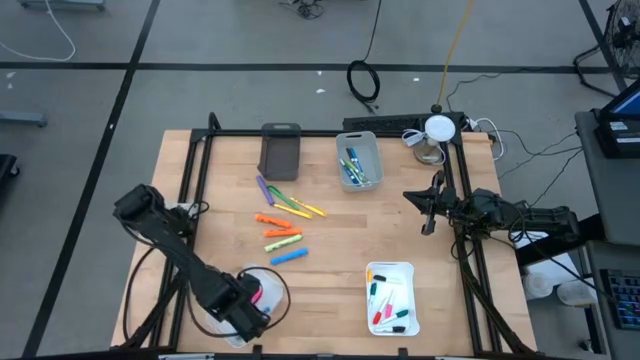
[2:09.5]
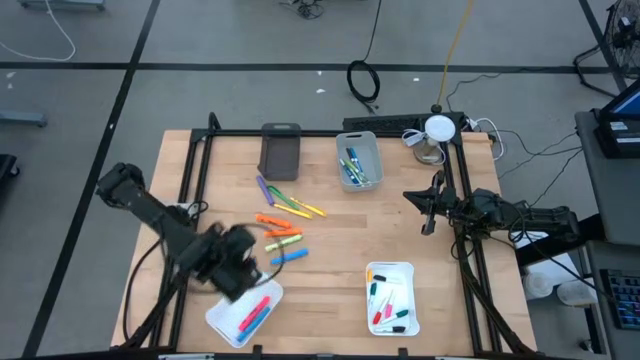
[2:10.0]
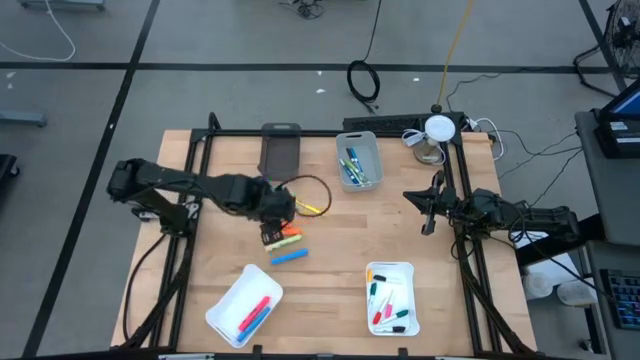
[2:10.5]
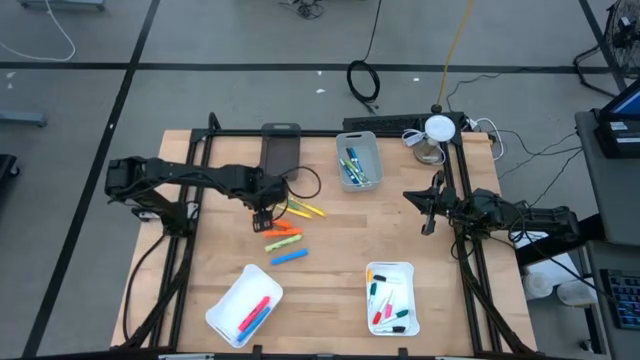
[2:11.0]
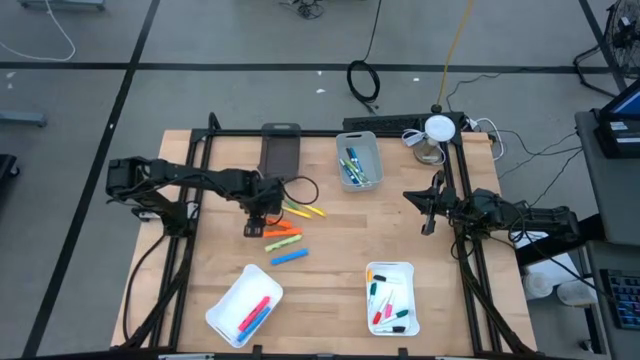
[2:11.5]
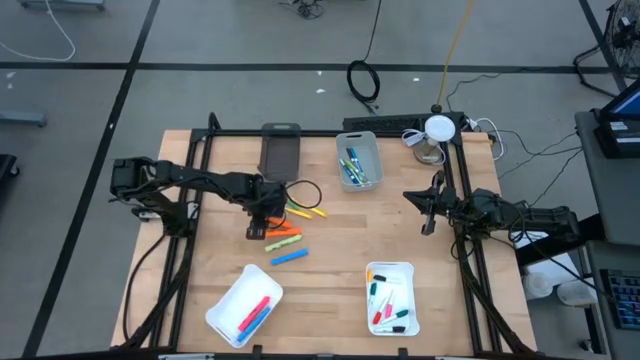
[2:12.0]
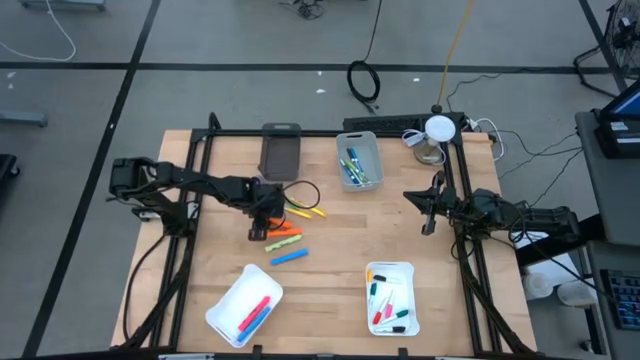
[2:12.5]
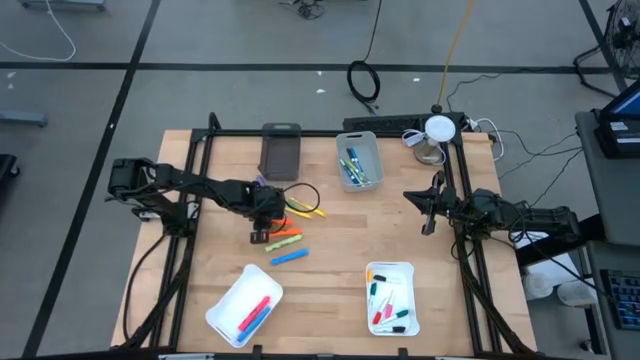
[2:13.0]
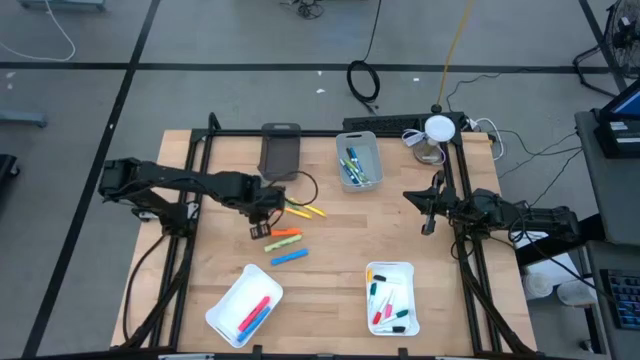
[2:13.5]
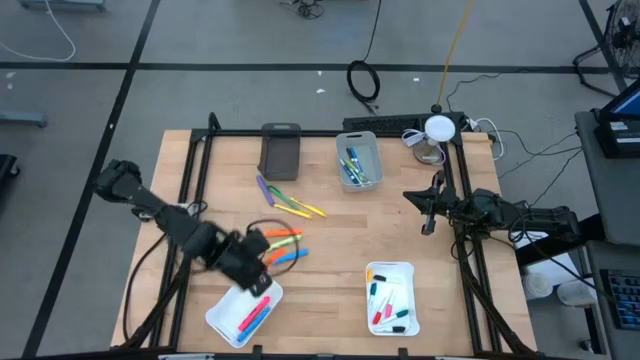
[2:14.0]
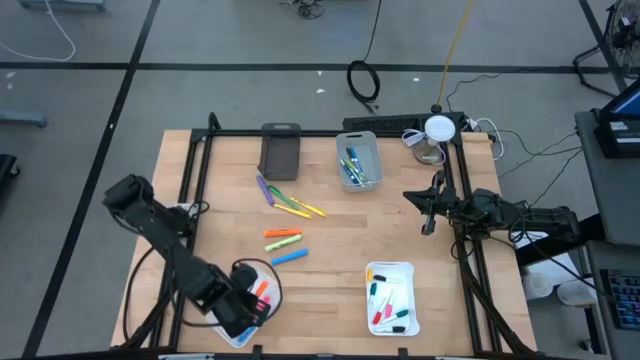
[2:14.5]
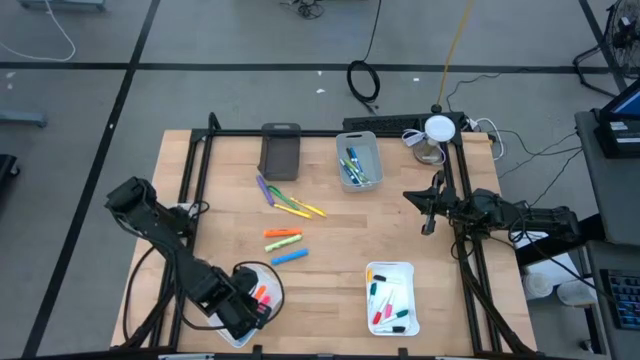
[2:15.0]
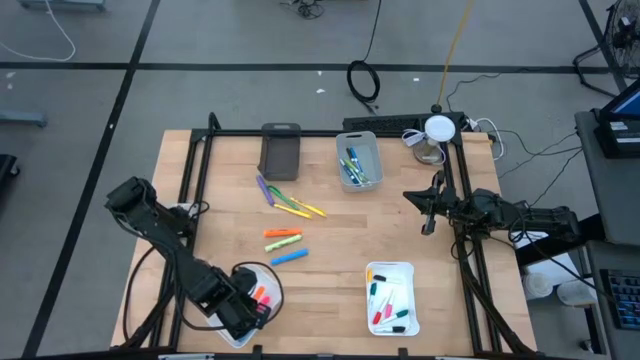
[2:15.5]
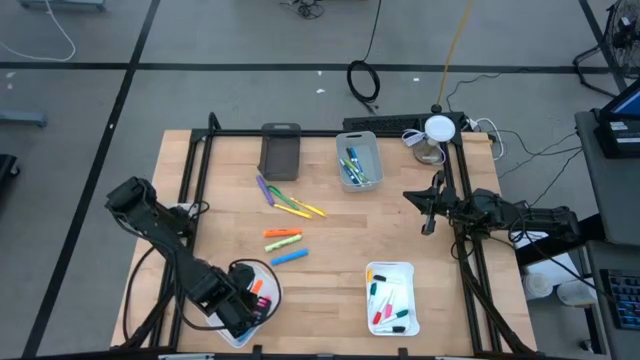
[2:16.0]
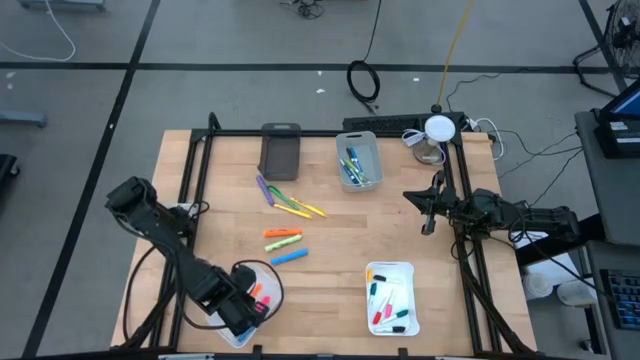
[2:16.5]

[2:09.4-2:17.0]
Task: Pick & Place Markers
Put the top orange marker pen into the left white bin

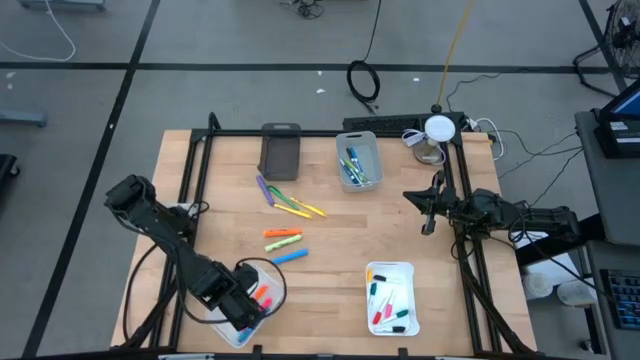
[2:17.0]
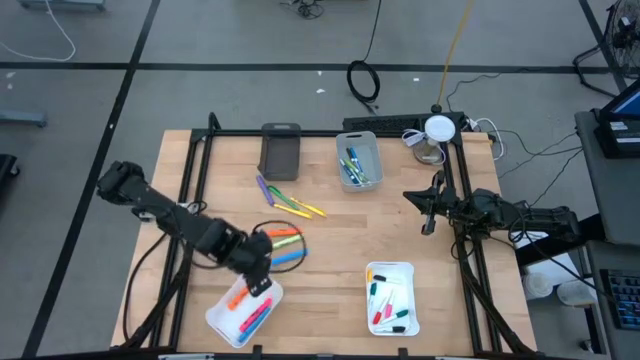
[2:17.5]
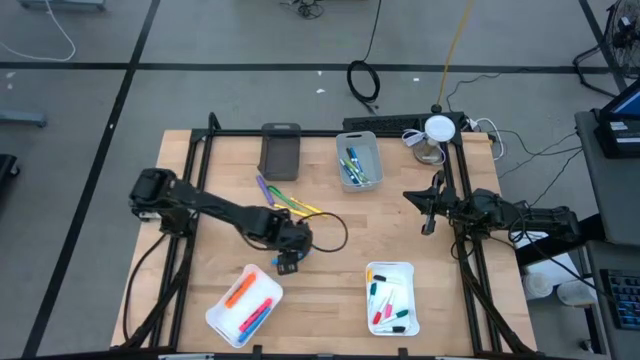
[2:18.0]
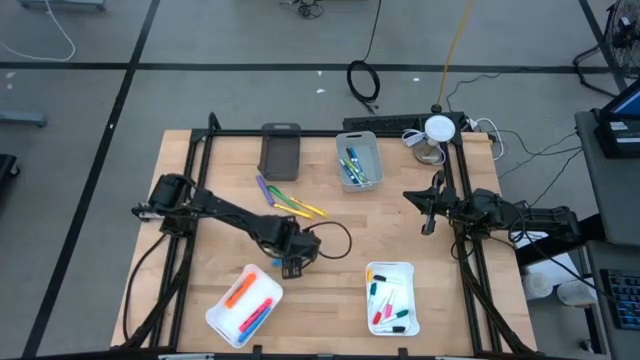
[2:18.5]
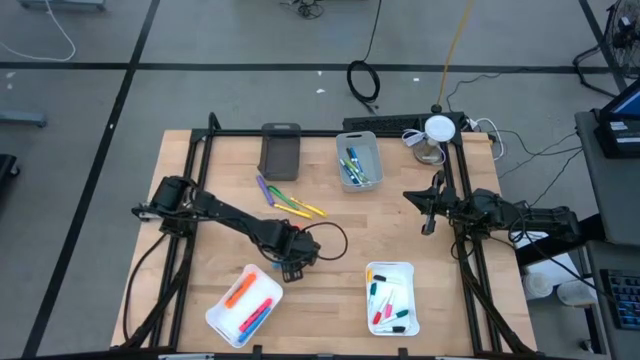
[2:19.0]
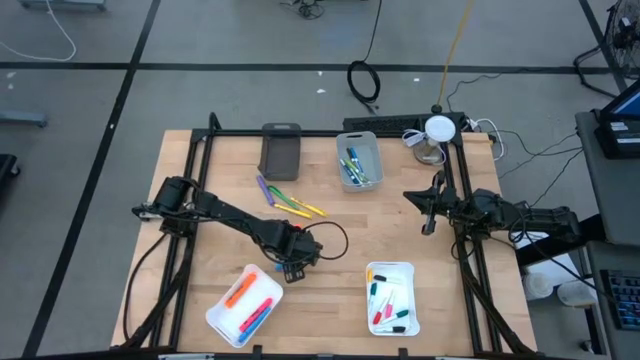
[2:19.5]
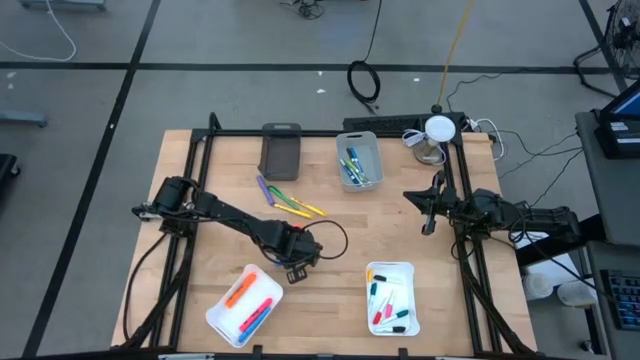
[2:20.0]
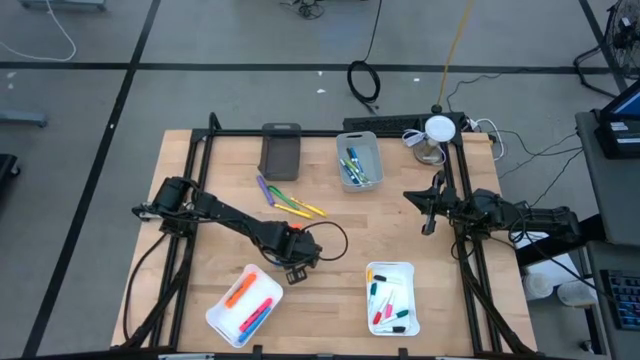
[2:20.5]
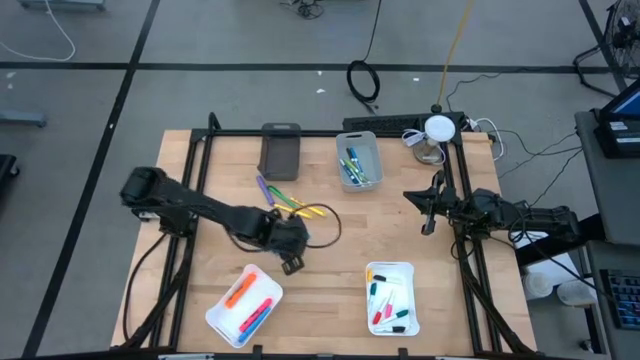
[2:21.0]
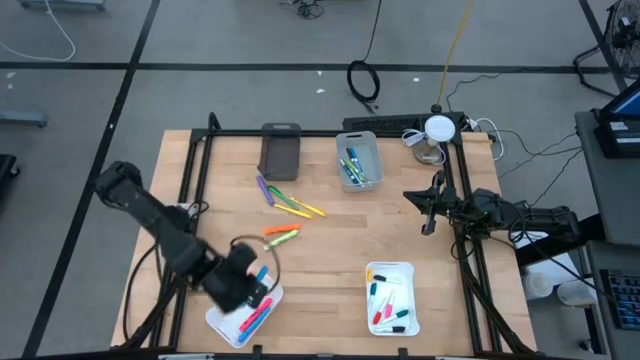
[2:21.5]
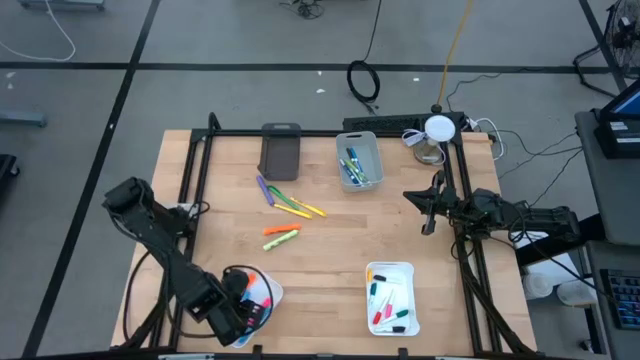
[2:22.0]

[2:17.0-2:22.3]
Put the blue marker pen into the left white bin

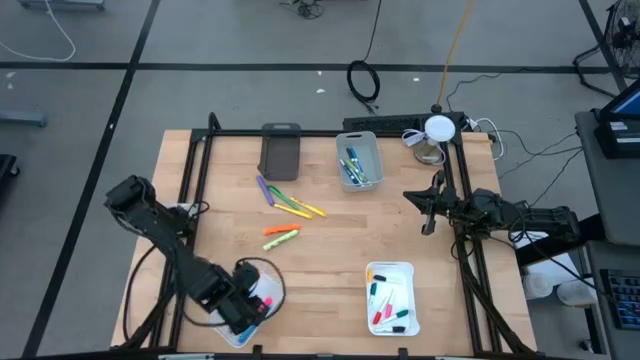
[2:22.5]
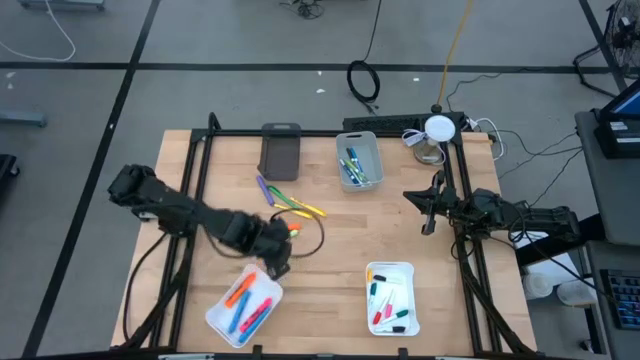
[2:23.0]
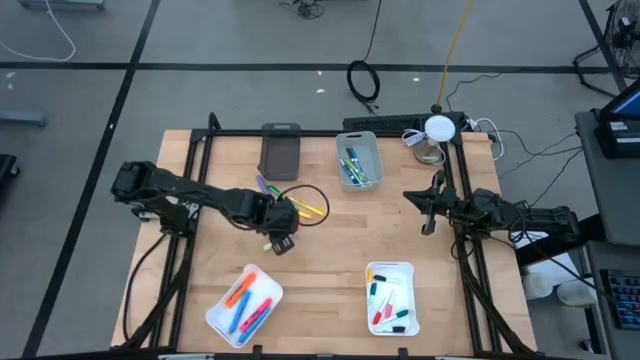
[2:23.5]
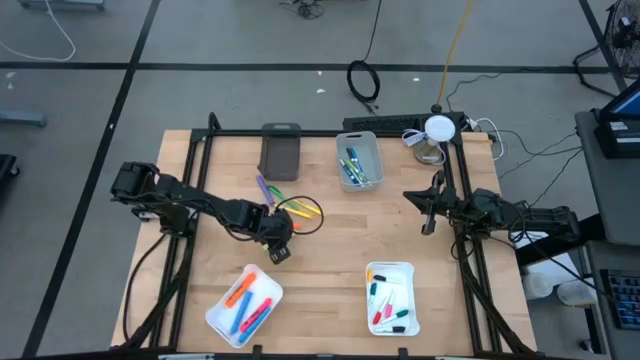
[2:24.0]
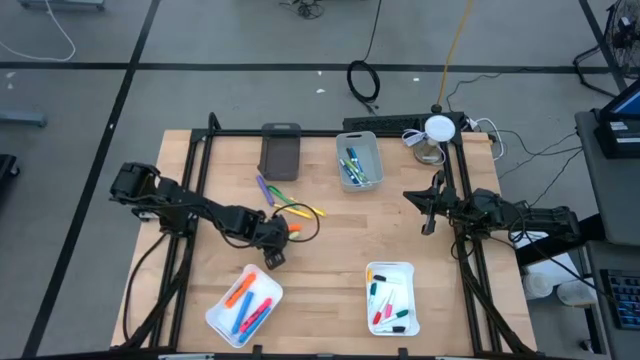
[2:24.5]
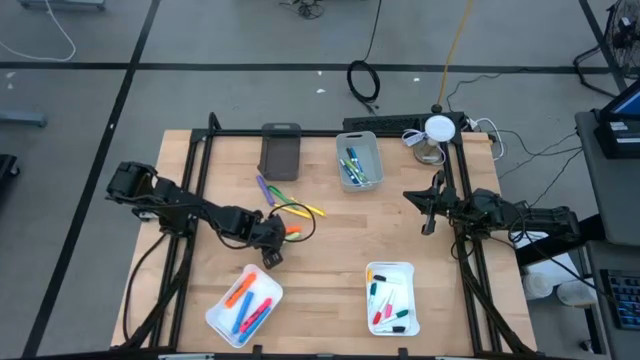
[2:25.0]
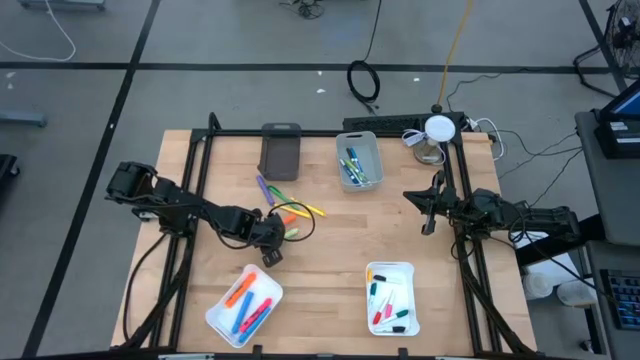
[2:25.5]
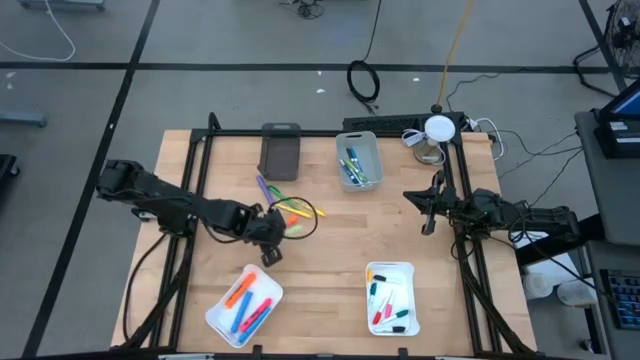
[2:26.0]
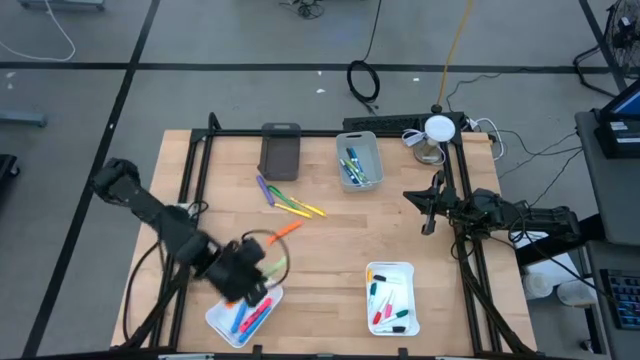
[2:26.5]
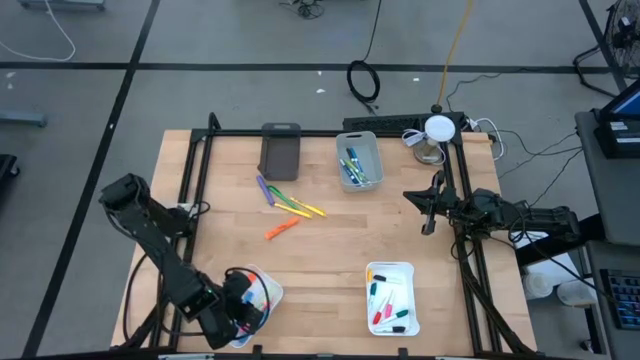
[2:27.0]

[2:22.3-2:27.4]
Put the green marker pen into the left white bin

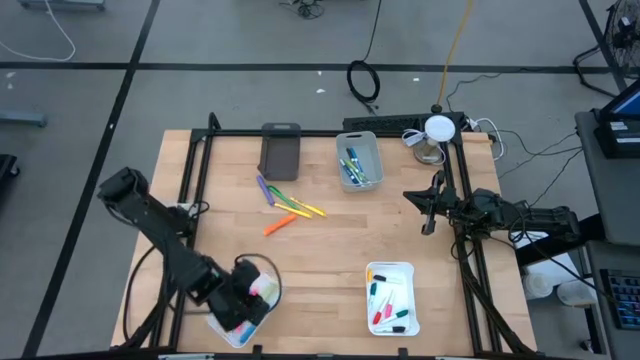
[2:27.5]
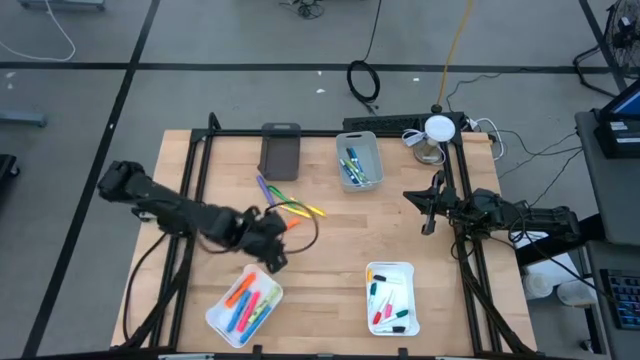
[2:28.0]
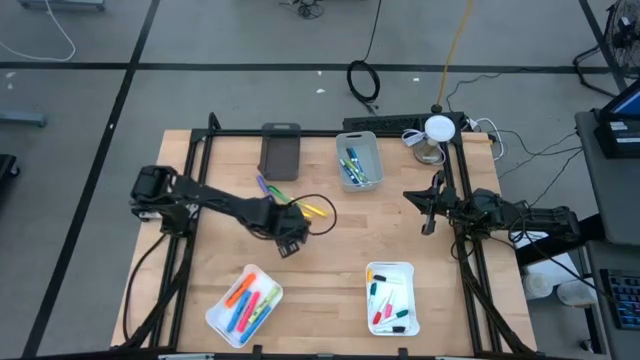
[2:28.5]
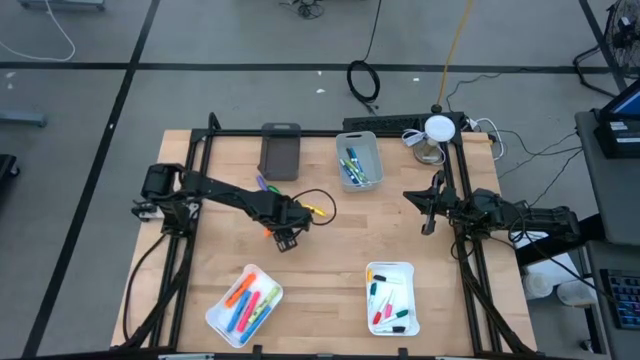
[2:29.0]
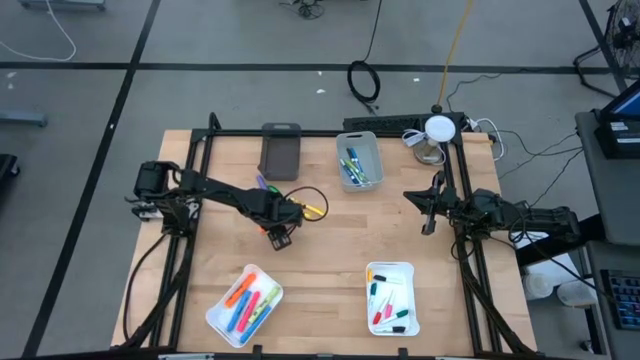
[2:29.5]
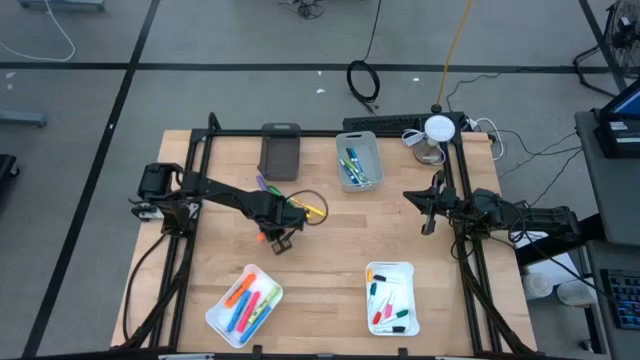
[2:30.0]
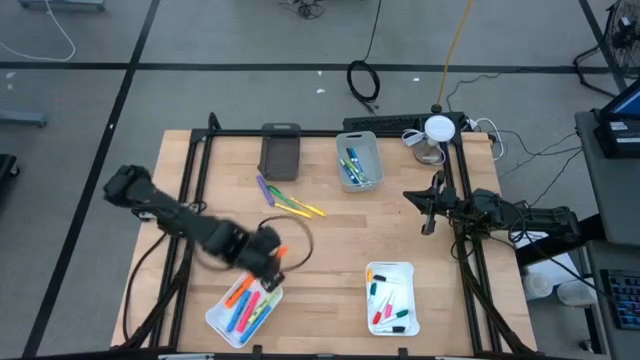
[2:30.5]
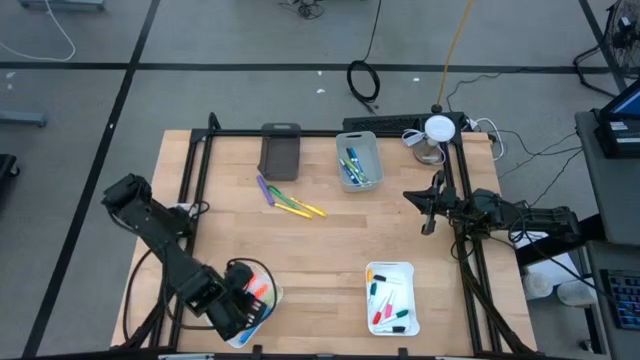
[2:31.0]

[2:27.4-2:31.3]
Put the orange marker pen into the left white bin
